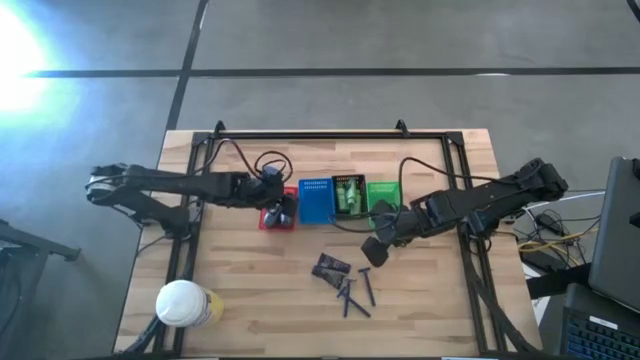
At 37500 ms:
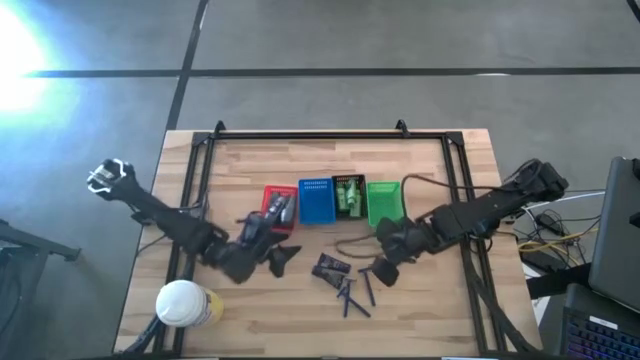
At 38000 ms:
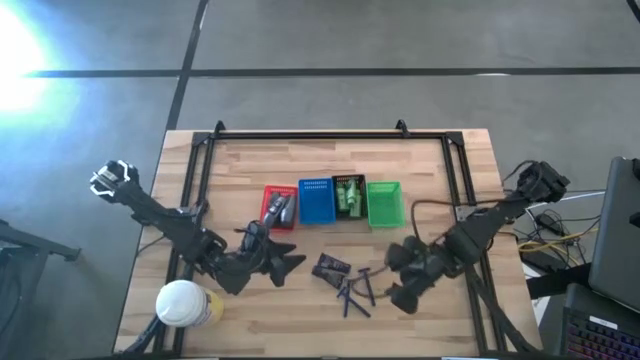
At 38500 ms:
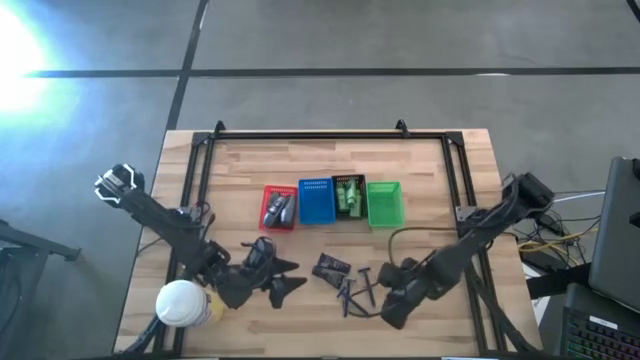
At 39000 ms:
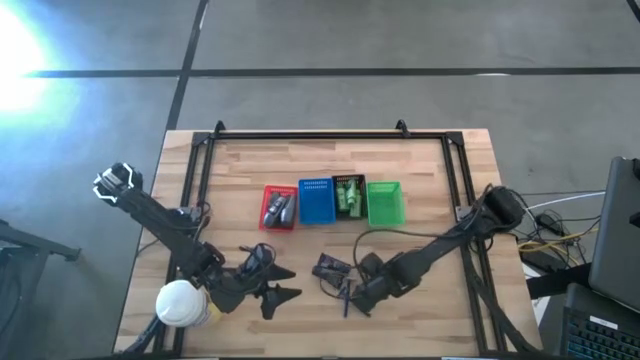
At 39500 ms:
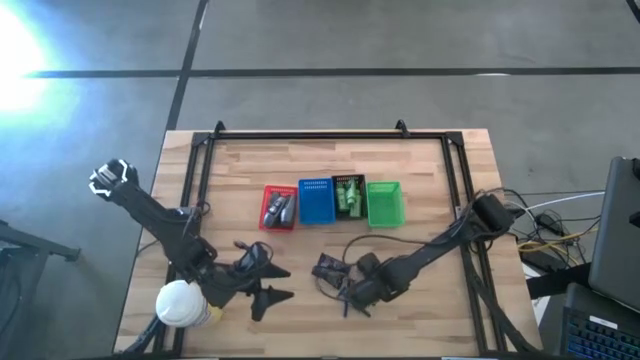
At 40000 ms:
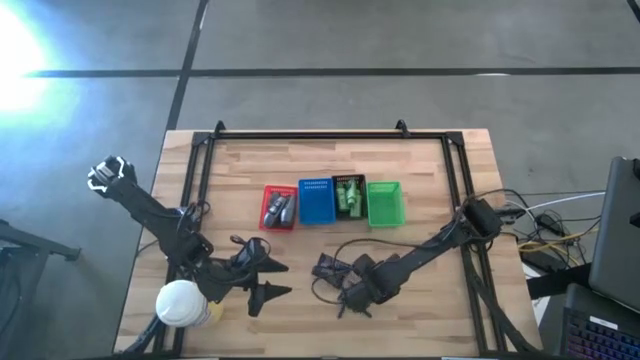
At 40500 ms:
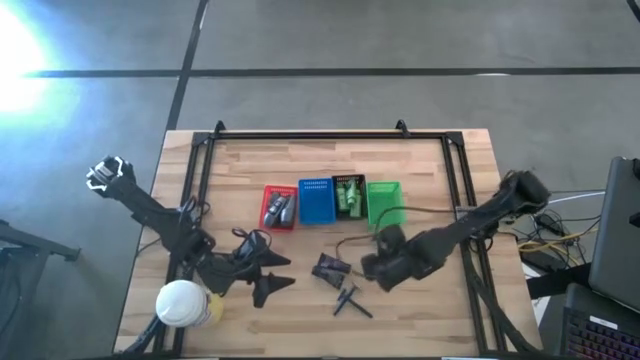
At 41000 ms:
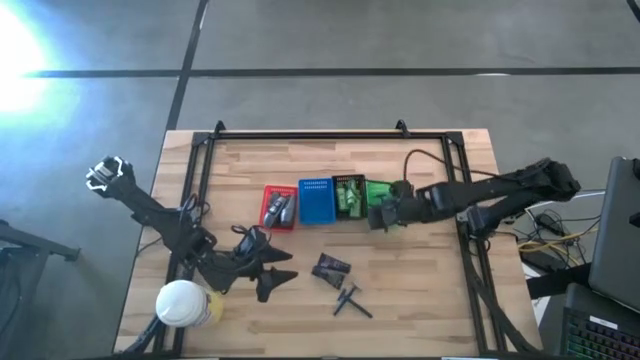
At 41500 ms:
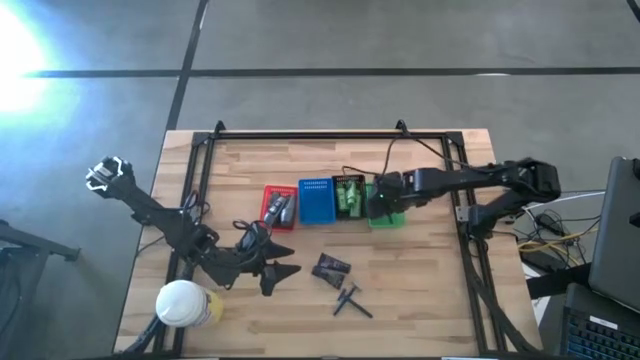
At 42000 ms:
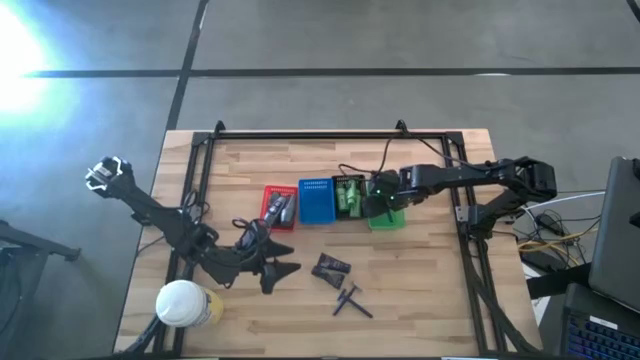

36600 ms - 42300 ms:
Task: Pick & Place Travel size toiletries
Put the blue razor into the green basket

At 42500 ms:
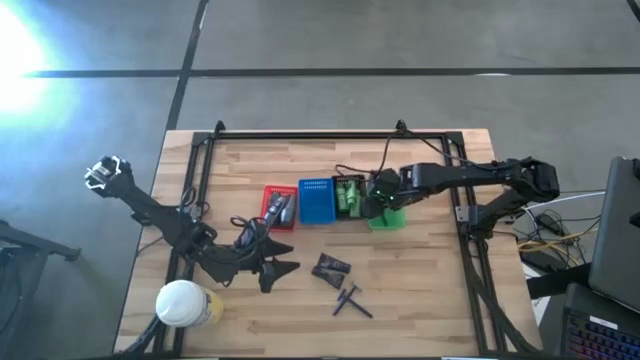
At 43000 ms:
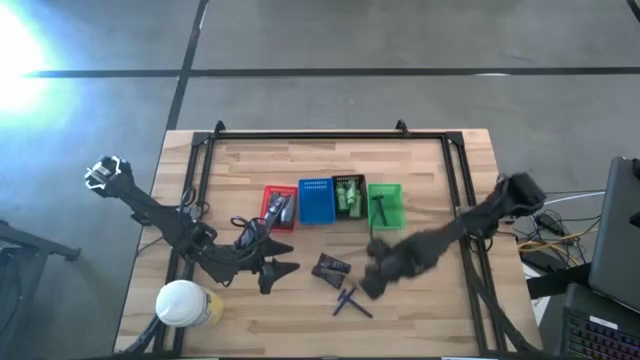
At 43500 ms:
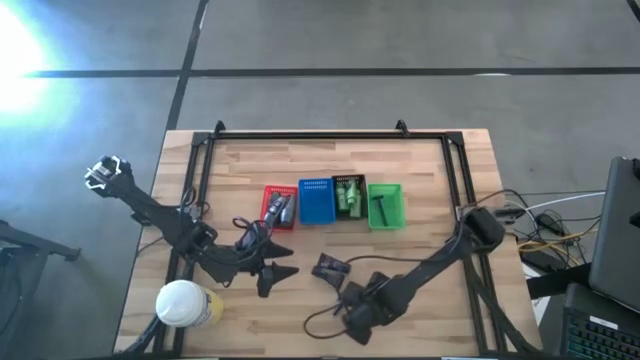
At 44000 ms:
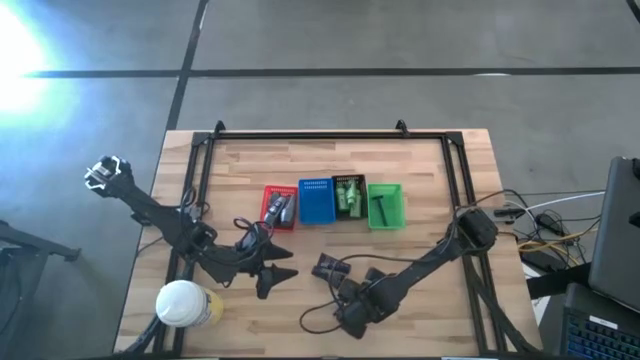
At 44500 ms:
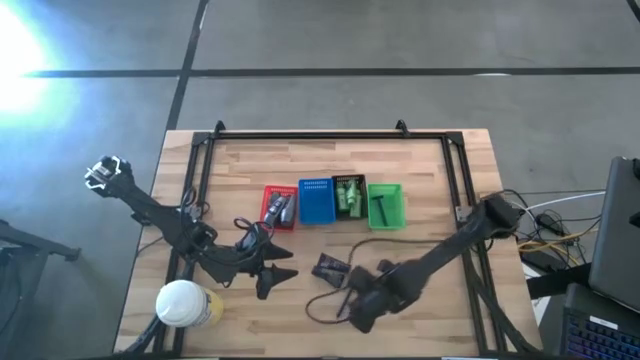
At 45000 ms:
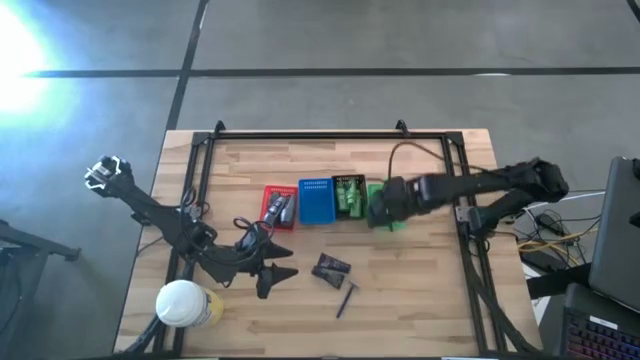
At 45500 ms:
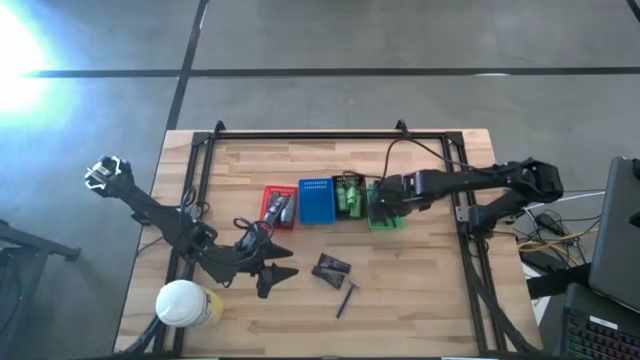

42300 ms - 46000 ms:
Put the blue razor into the green basket

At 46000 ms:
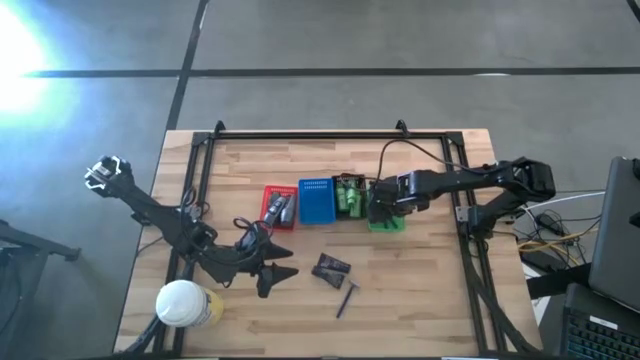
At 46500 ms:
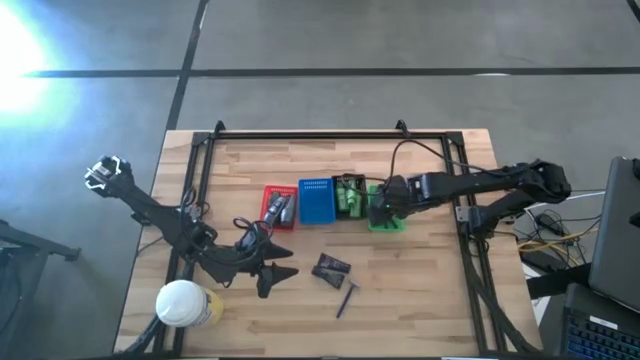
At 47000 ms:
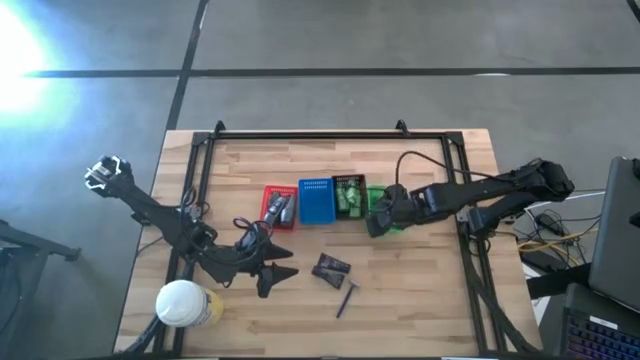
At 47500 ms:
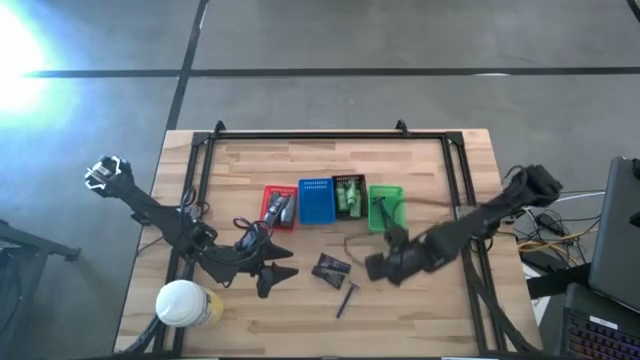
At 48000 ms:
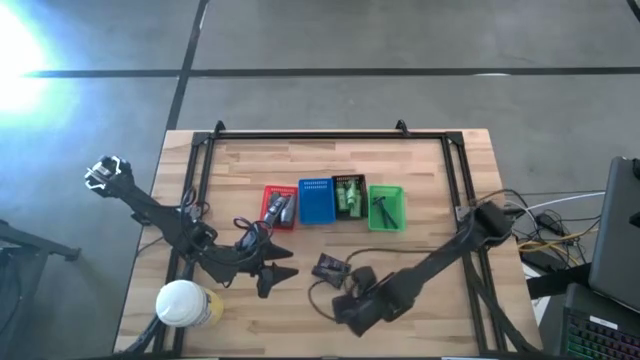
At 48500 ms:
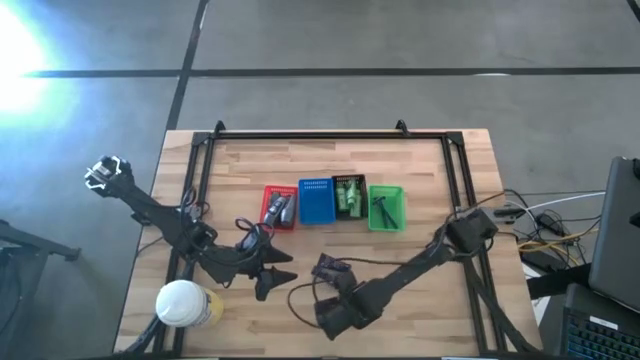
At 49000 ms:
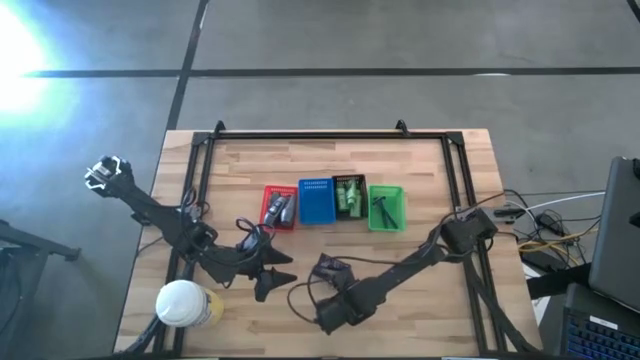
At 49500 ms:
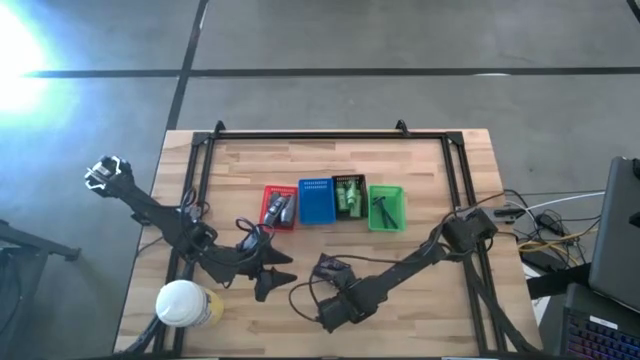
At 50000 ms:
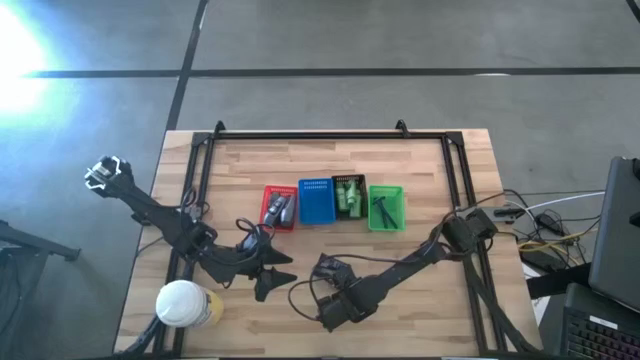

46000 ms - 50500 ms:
Put the blue razor into the green basket

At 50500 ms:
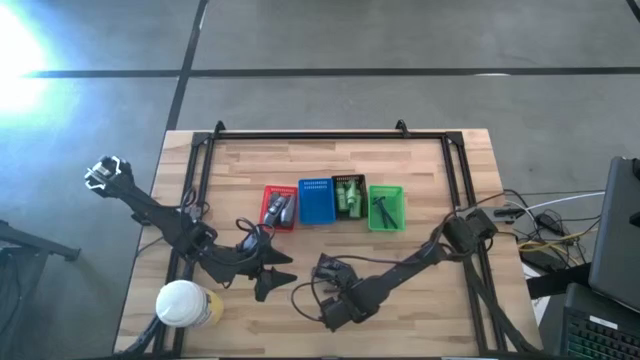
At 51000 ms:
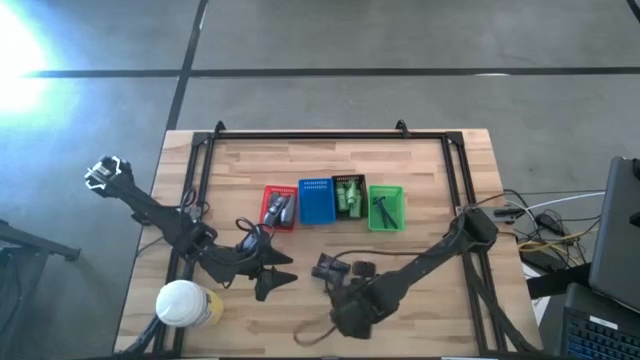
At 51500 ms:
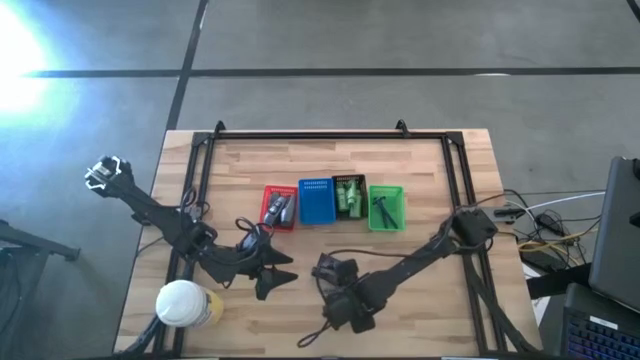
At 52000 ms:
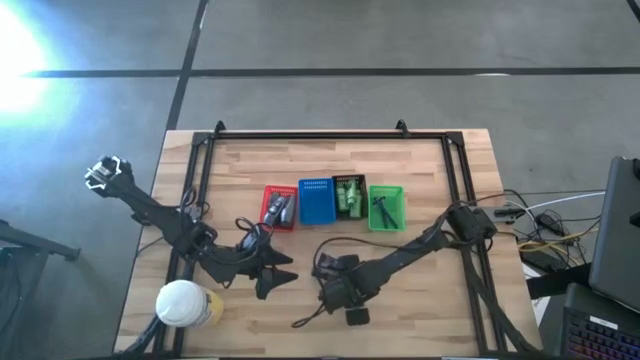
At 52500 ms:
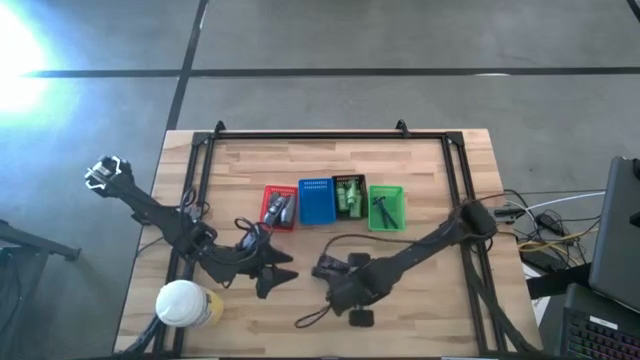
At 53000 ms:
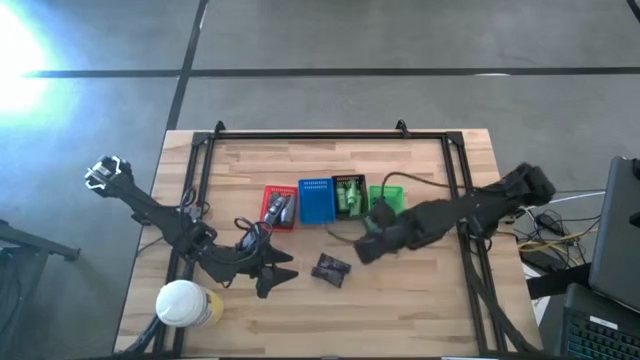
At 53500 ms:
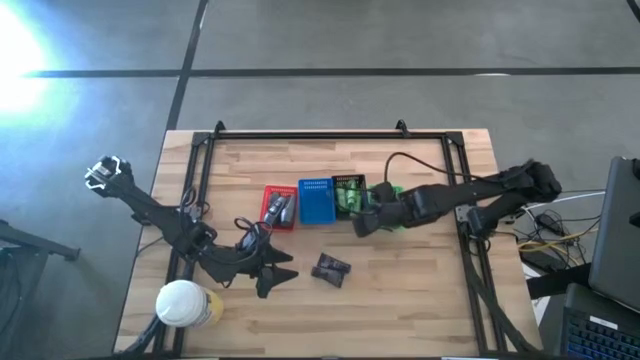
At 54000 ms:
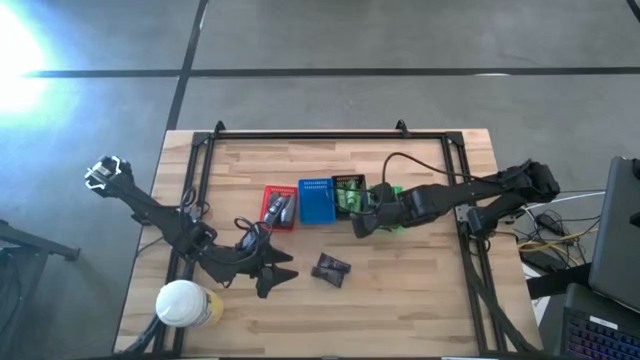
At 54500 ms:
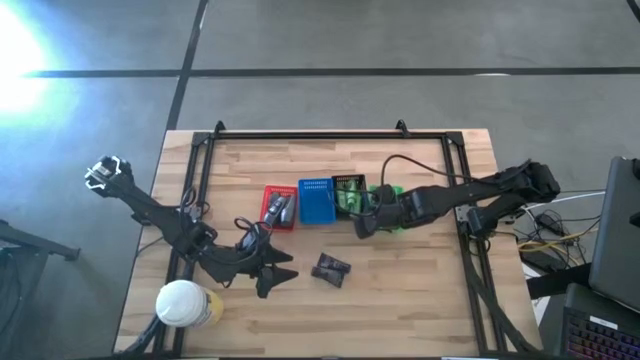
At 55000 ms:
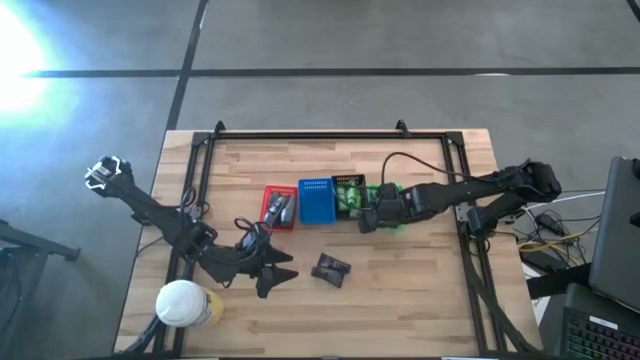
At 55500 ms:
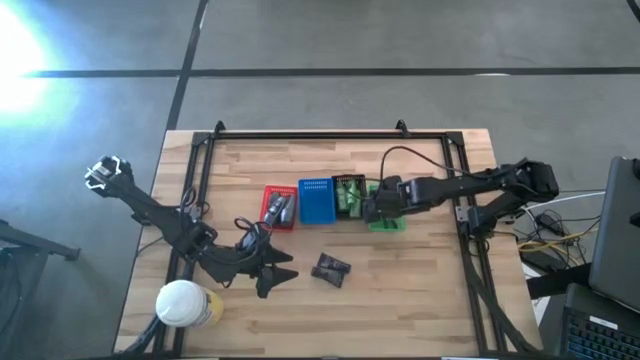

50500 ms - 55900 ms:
Put the blue razor into the green basket

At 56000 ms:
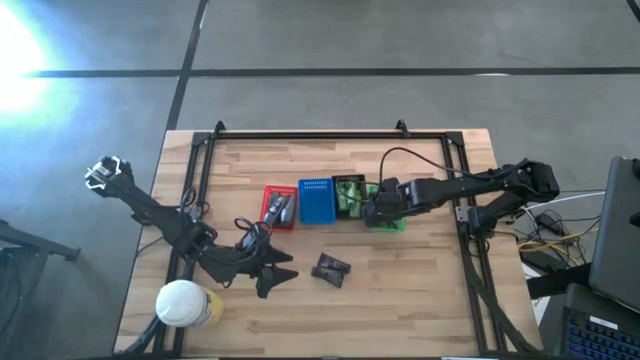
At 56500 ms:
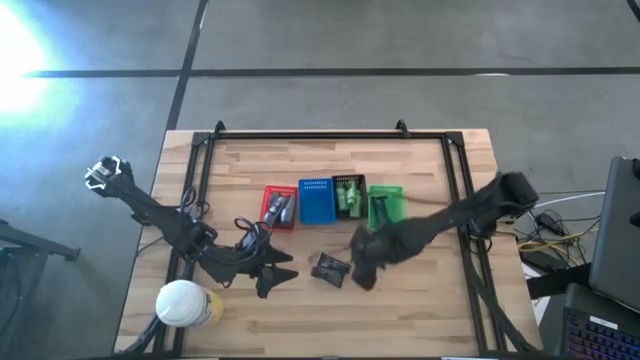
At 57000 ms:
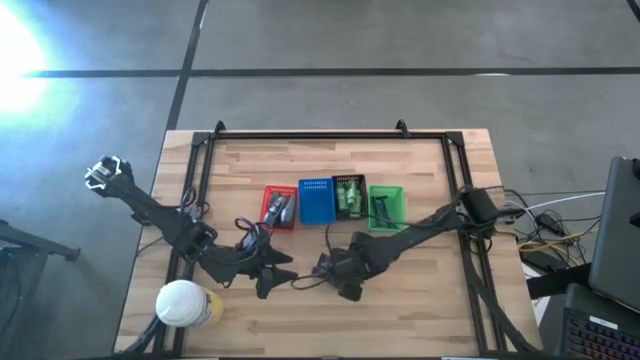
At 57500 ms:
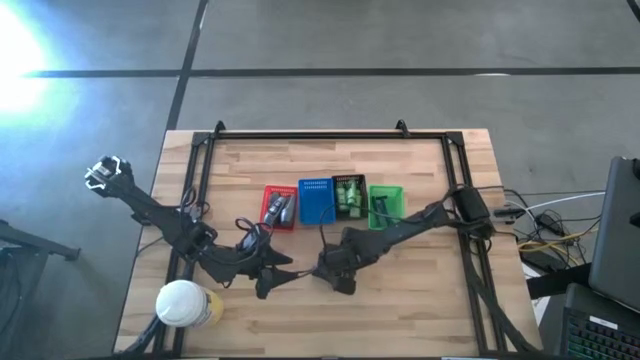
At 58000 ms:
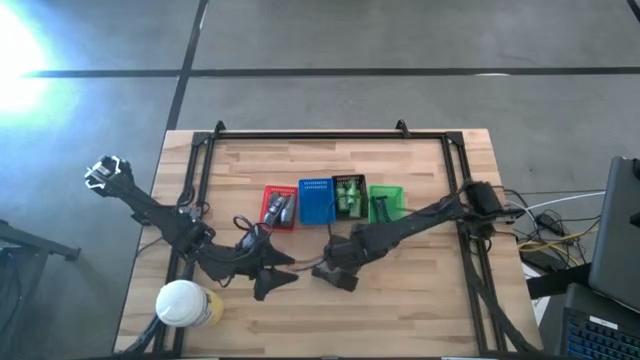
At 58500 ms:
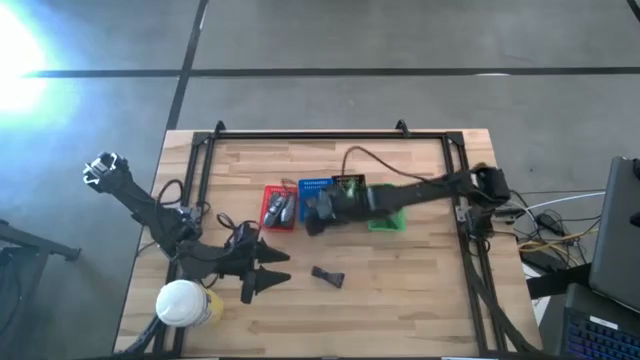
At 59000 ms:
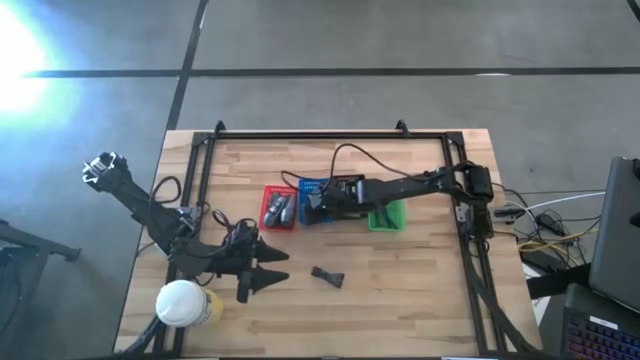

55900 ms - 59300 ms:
Put the black shave cream into the blue bin
